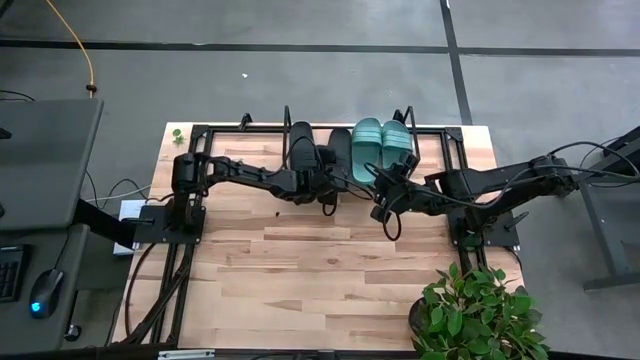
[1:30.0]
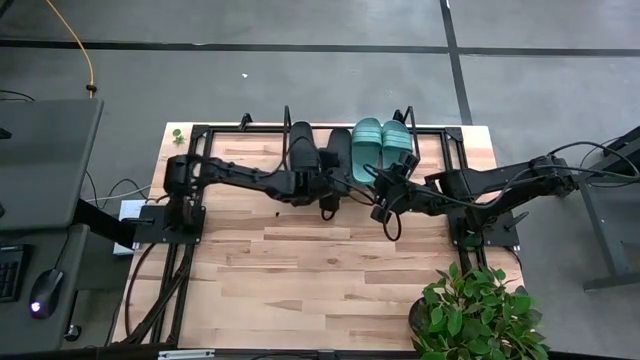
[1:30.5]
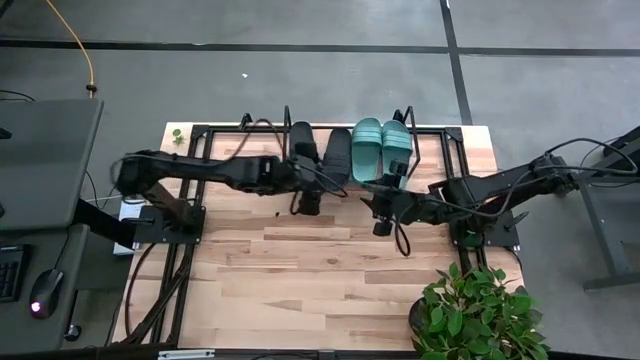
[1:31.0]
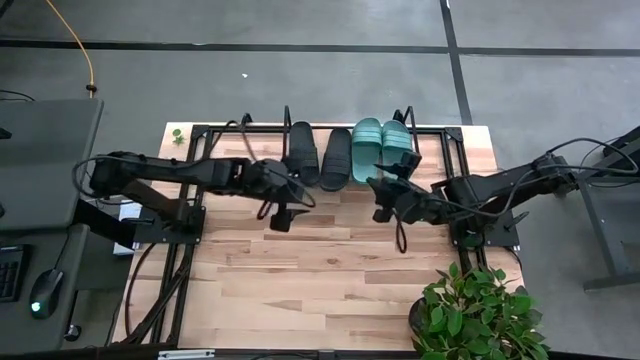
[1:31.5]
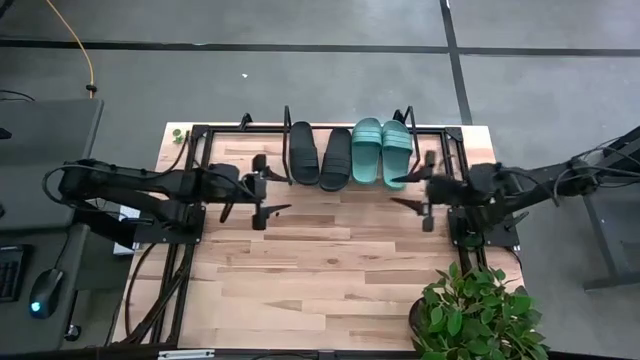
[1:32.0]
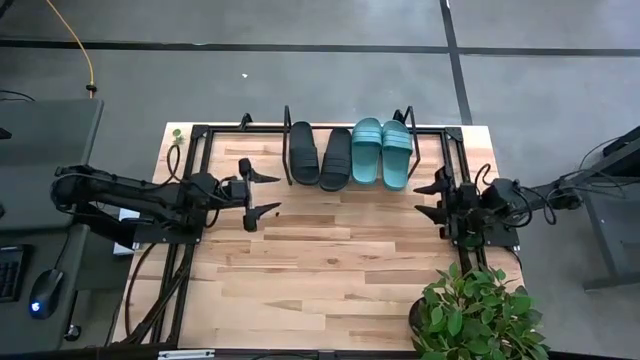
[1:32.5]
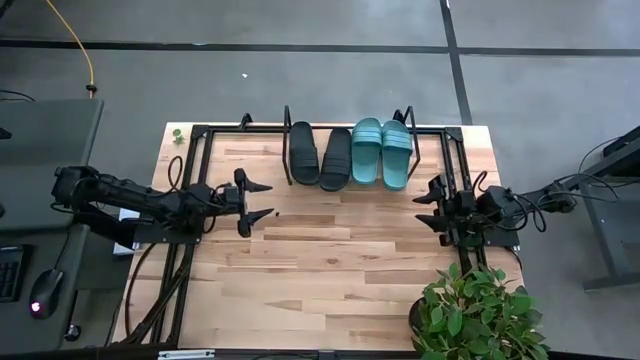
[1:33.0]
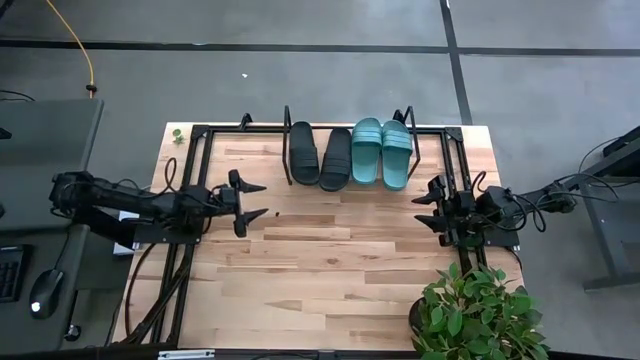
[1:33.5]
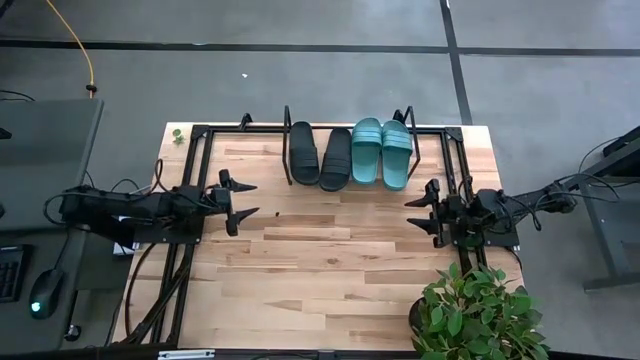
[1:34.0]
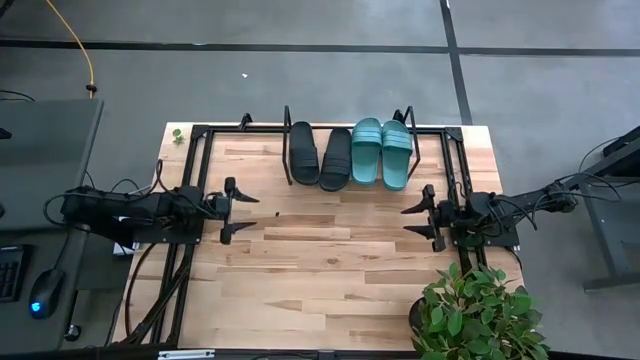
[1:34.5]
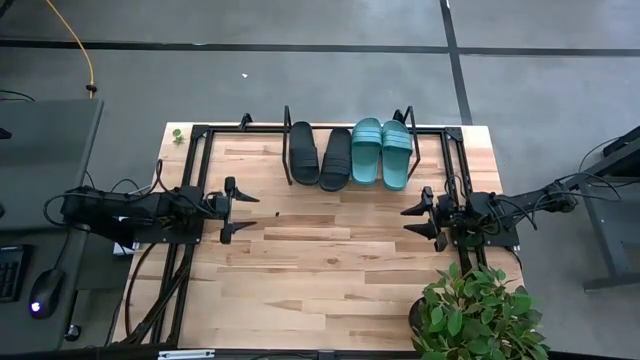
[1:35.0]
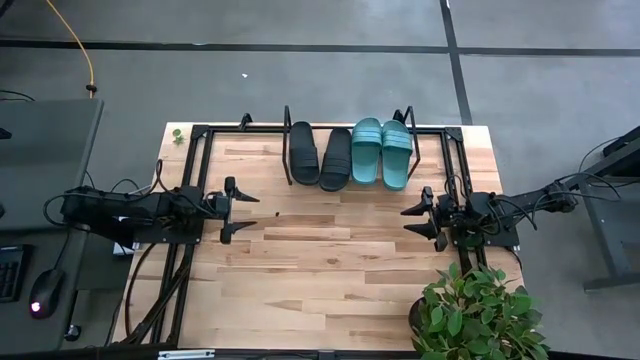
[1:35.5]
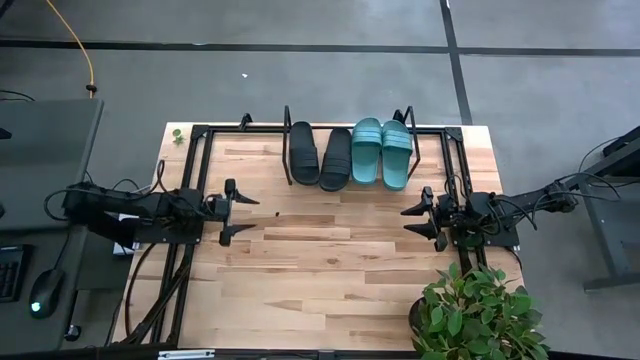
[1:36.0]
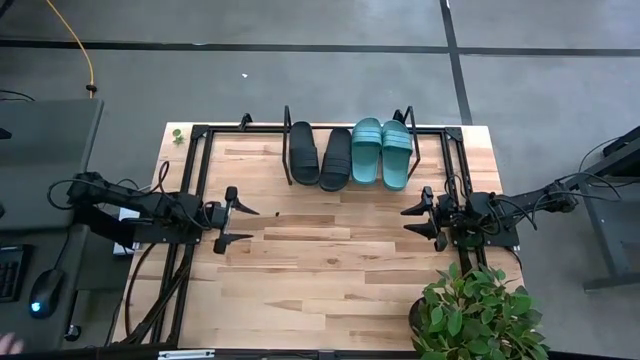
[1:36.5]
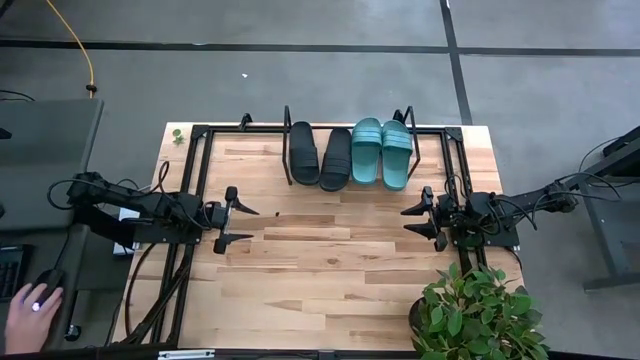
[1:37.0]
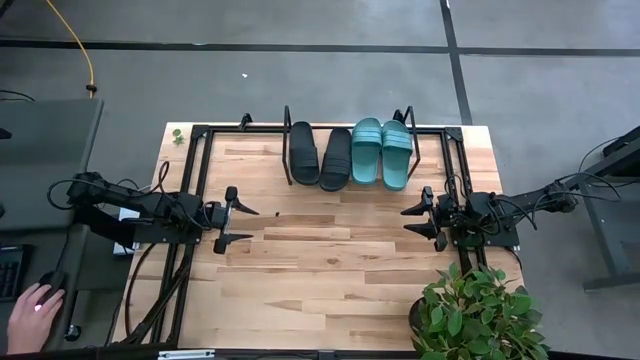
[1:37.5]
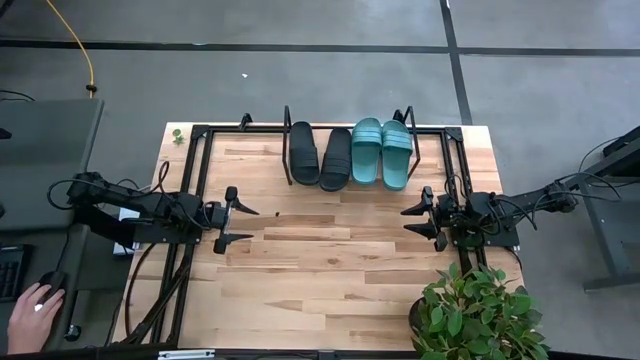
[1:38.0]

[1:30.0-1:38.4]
Task: Pick and place slides into the shelf
Return to Home Position

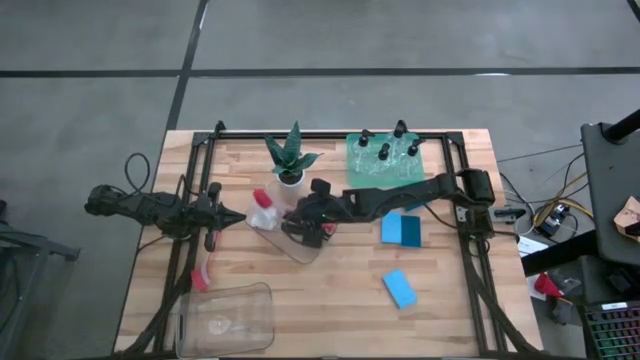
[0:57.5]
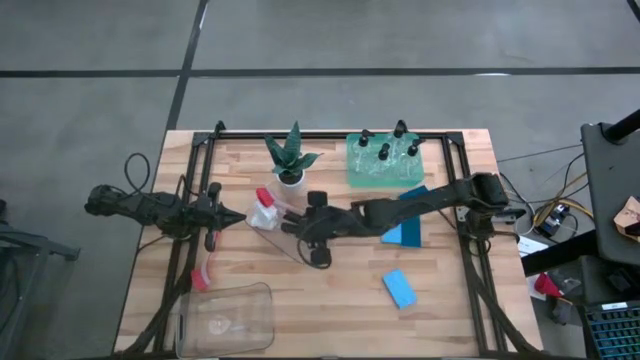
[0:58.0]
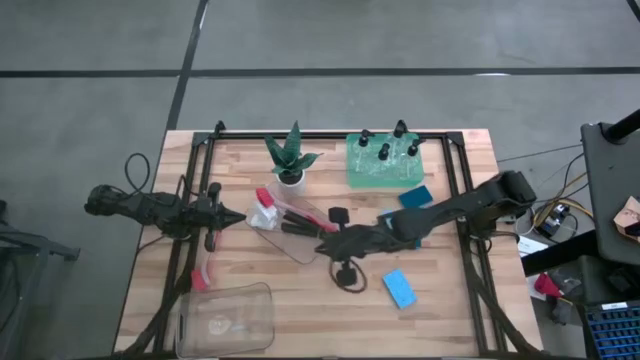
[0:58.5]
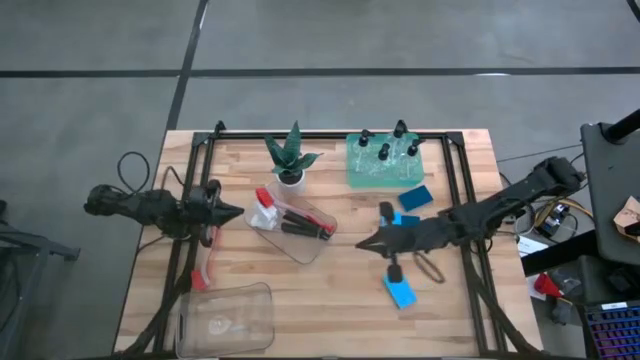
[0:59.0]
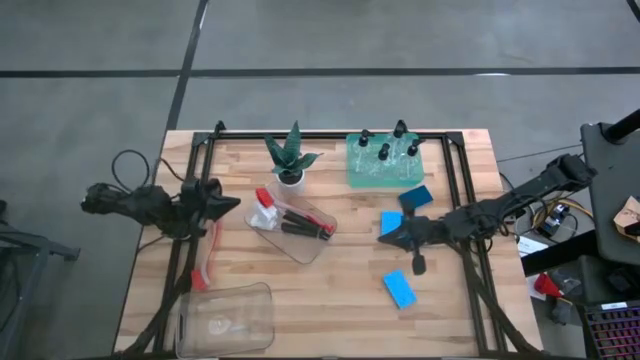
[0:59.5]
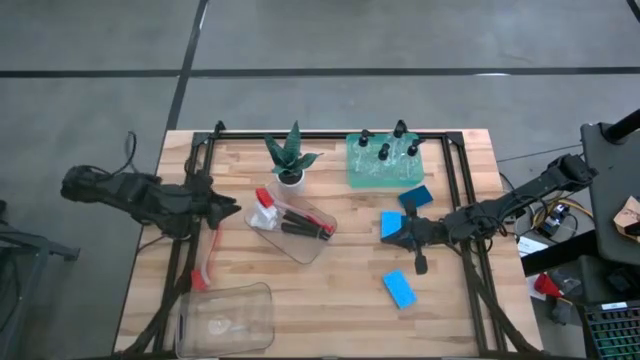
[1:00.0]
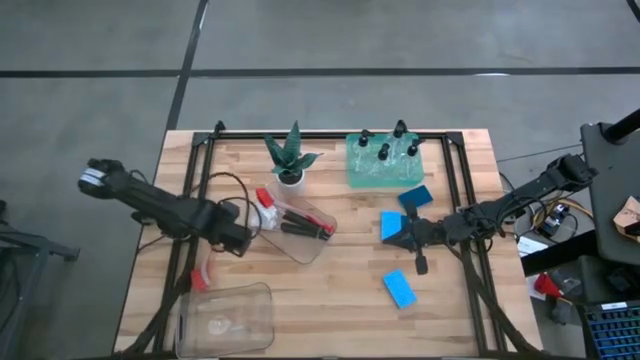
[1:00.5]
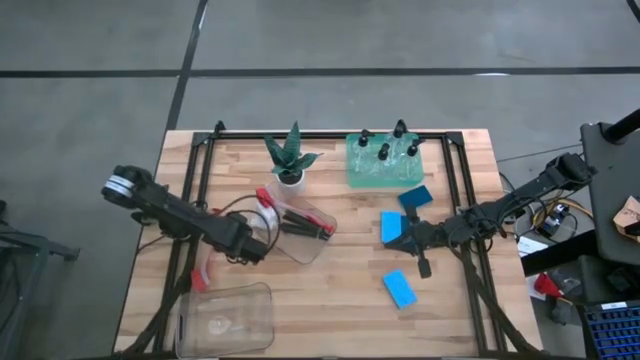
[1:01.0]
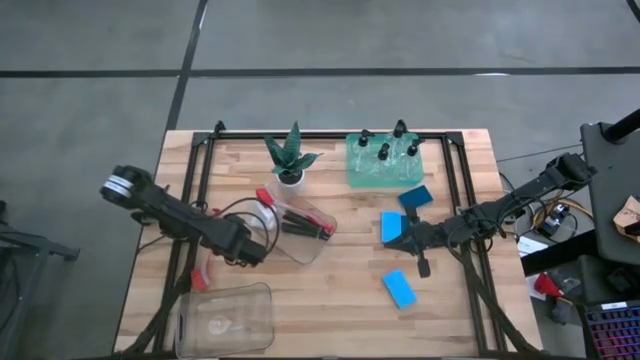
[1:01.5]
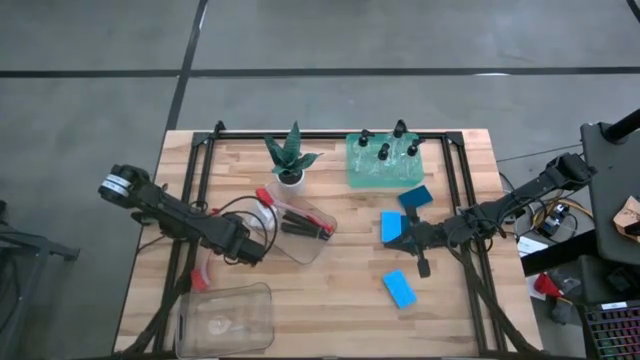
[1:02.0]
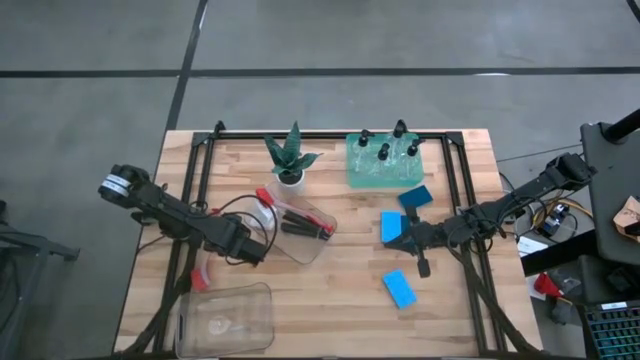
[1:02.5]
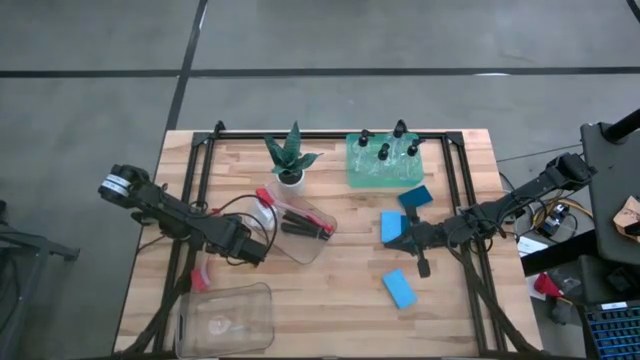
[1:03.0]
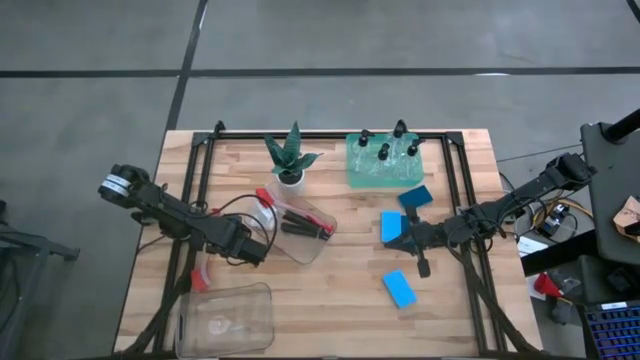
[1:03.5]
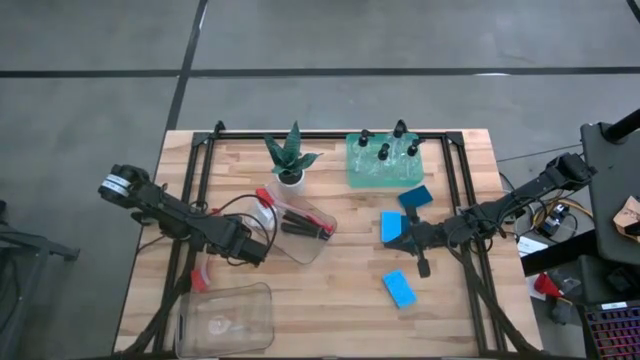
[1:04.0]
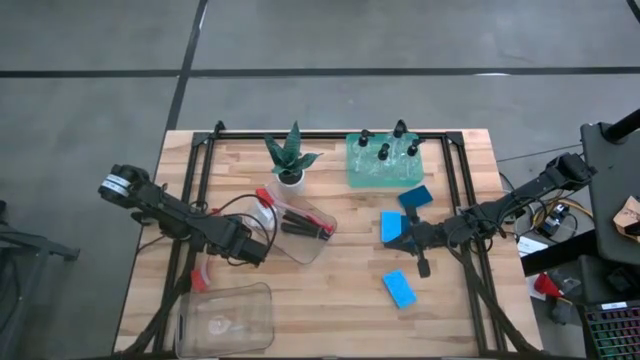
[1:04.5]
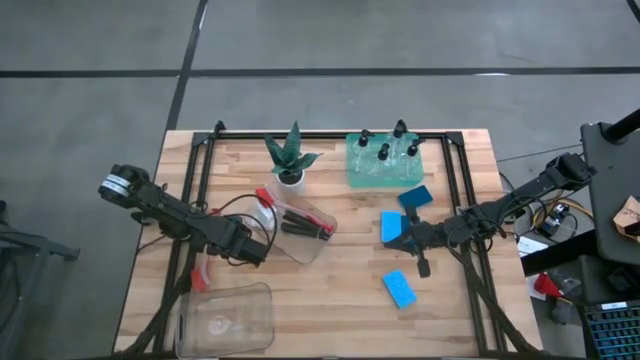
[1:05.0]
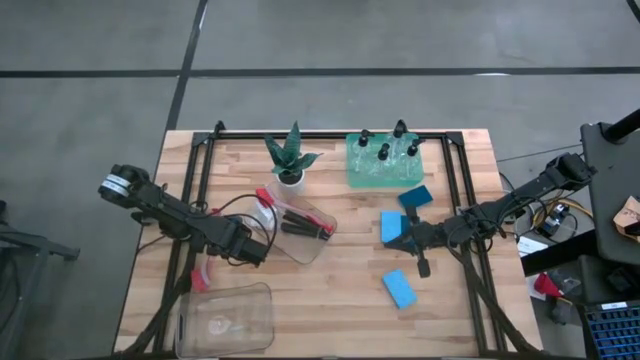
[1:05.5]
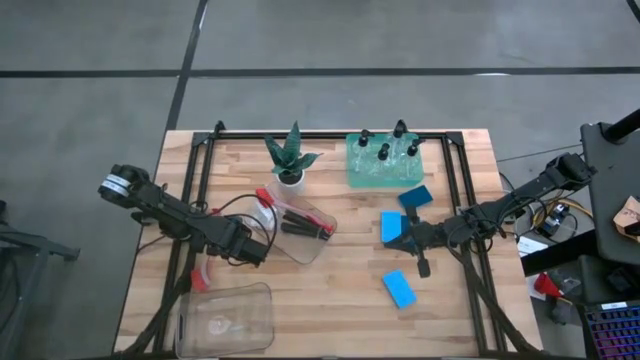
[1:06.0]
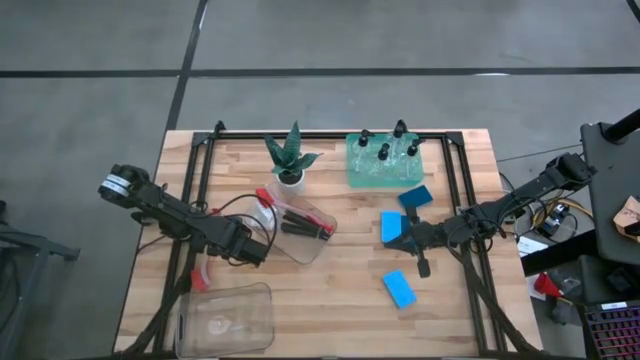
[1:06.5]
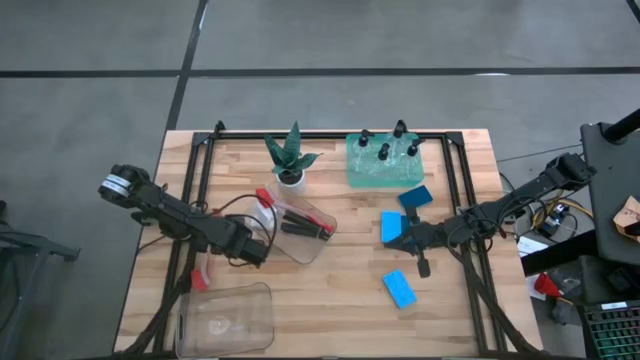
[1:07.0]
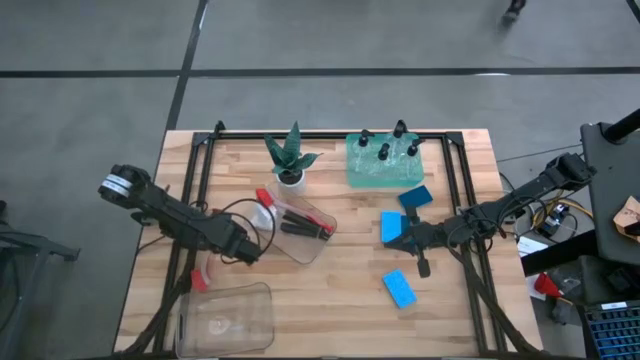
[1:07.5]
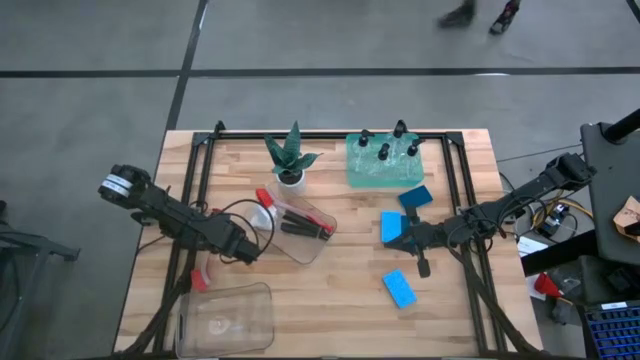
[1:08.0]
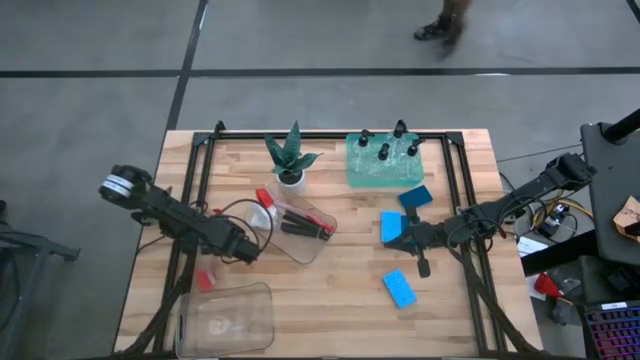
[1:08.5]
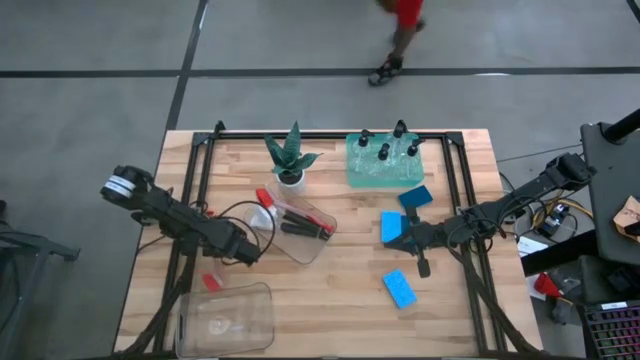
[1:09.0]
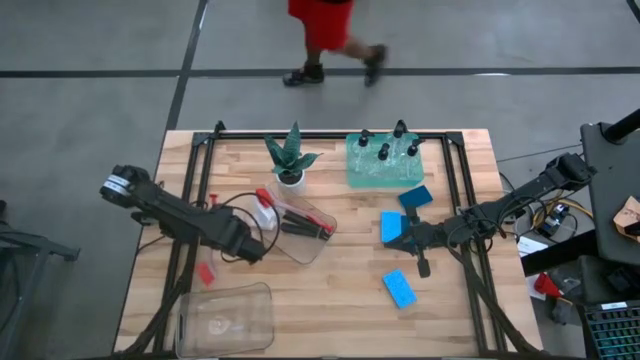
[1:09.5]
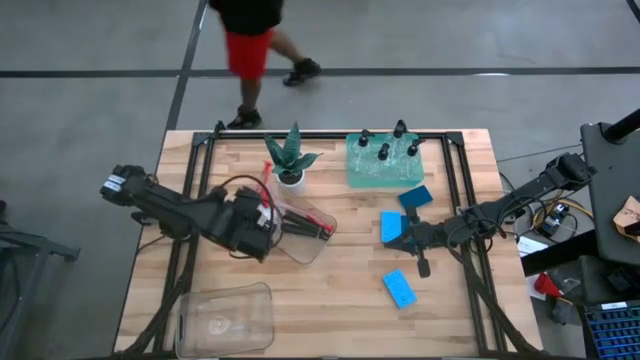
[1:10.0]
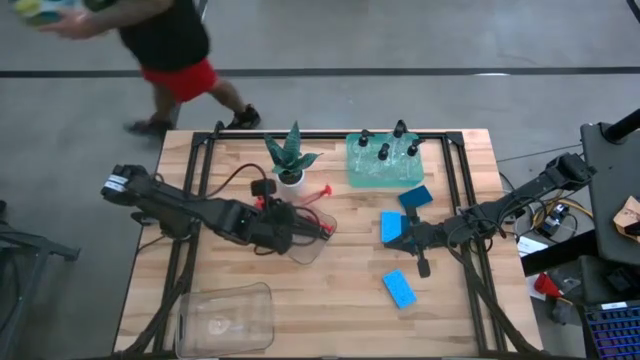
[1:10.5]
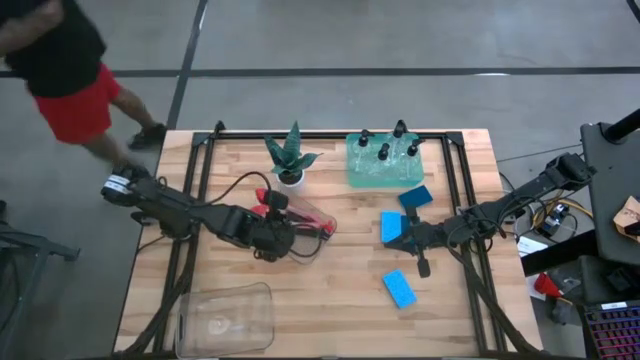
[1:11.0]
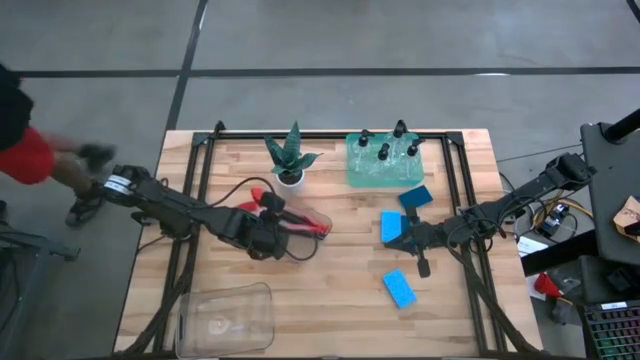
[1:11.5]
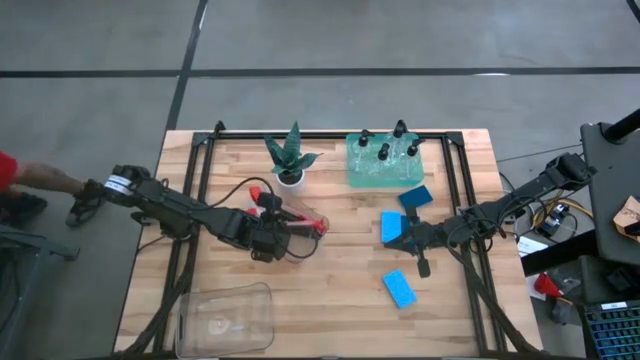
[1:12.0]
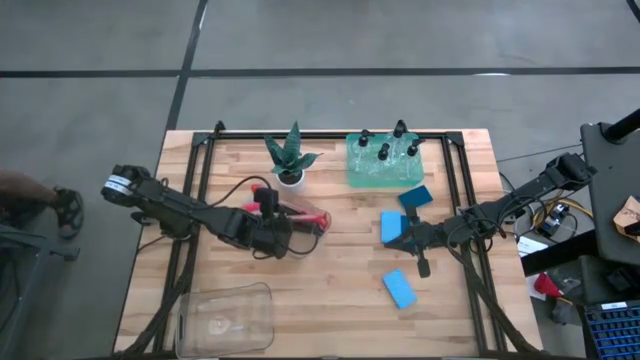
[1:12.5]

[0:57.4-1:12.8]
Task: Pick & Place Kitchen Sink Supplies
Put the orange dish brush into the top transparent bin
